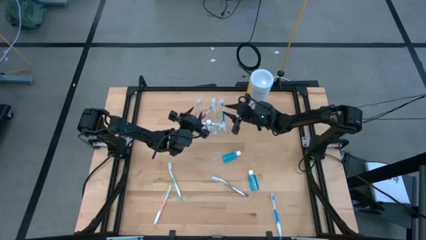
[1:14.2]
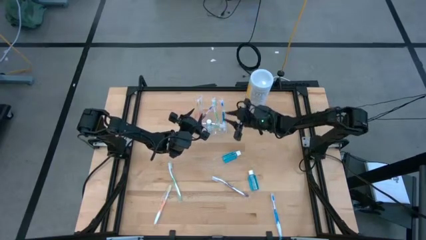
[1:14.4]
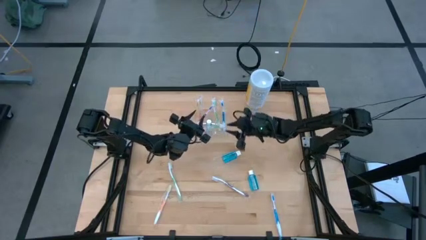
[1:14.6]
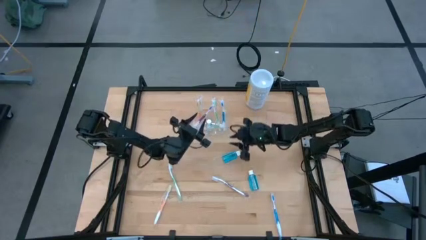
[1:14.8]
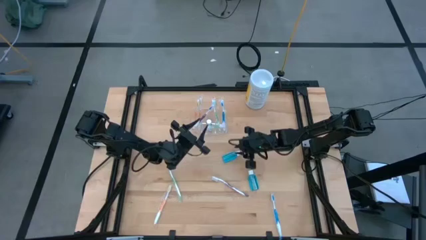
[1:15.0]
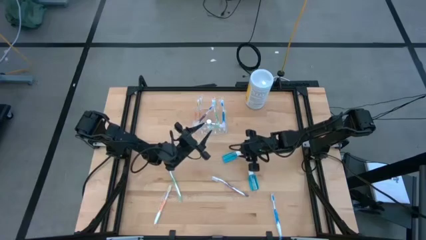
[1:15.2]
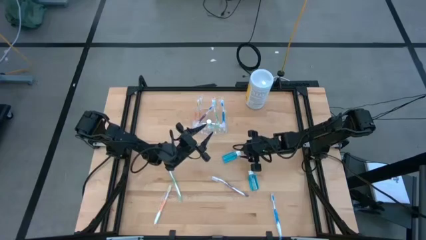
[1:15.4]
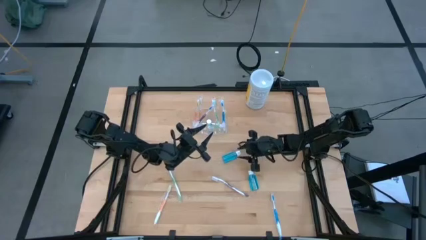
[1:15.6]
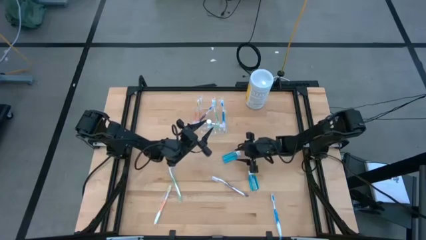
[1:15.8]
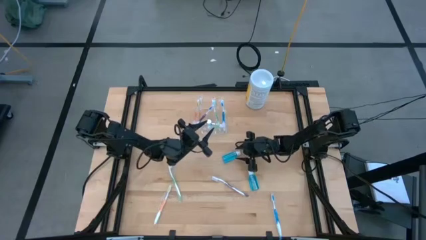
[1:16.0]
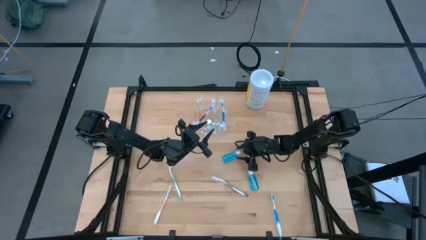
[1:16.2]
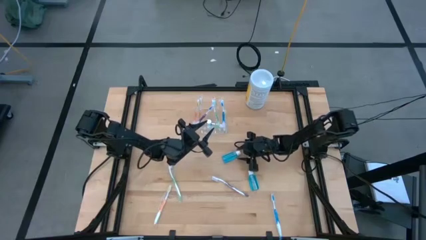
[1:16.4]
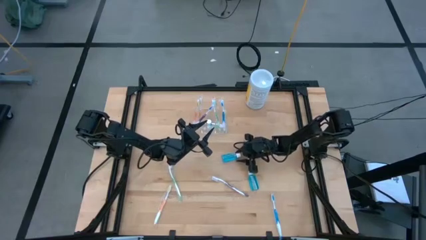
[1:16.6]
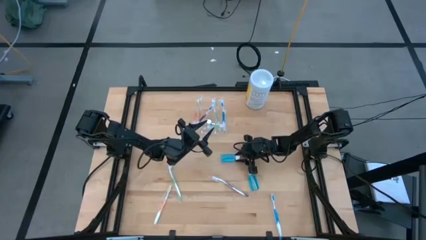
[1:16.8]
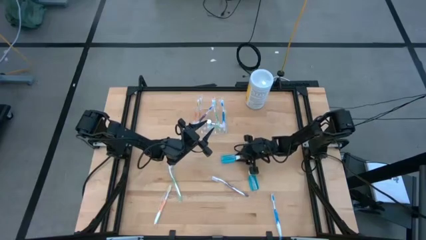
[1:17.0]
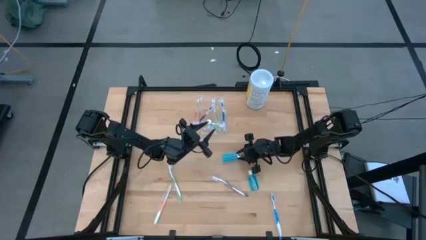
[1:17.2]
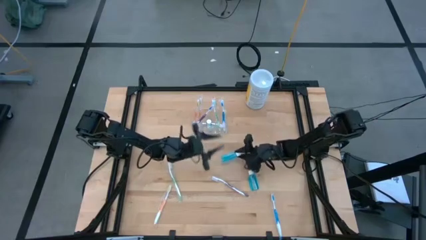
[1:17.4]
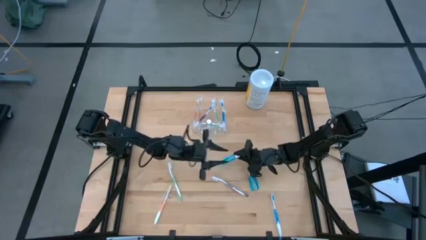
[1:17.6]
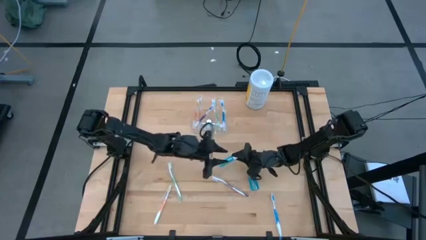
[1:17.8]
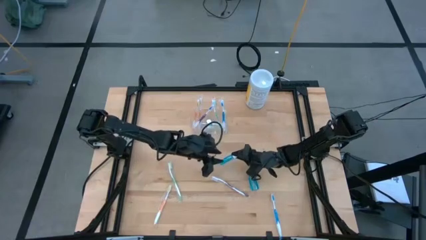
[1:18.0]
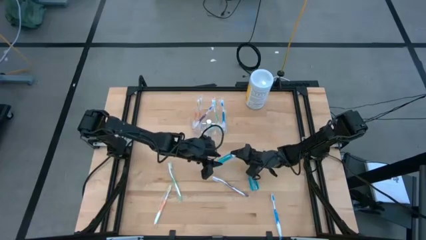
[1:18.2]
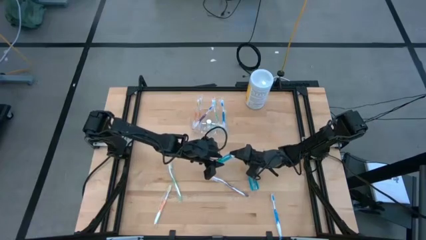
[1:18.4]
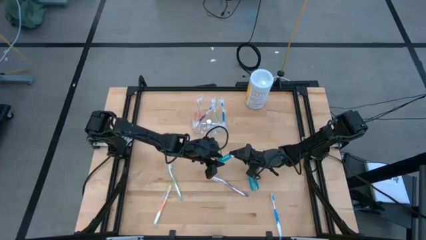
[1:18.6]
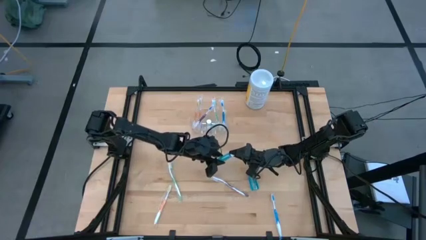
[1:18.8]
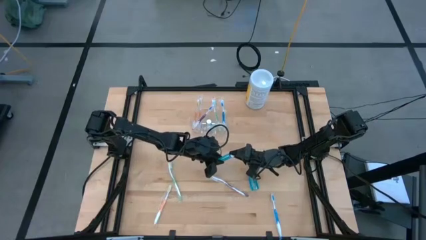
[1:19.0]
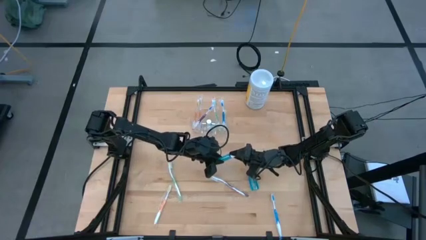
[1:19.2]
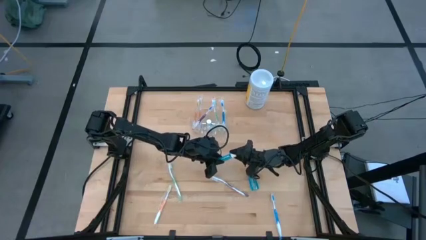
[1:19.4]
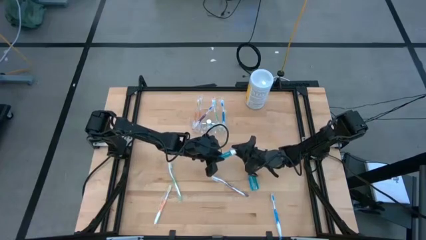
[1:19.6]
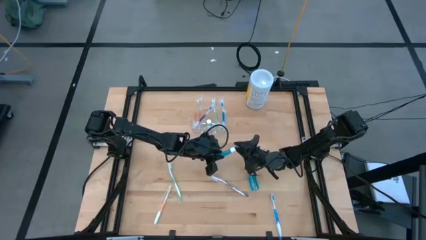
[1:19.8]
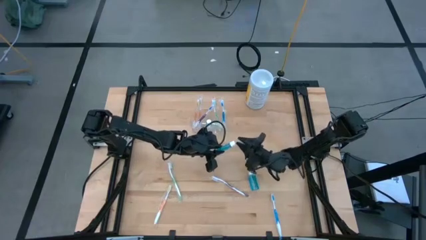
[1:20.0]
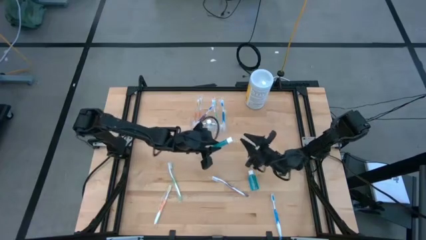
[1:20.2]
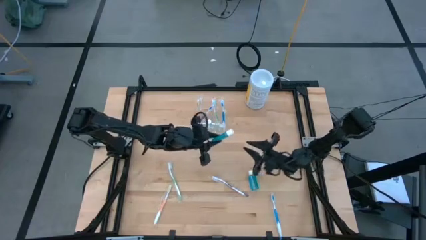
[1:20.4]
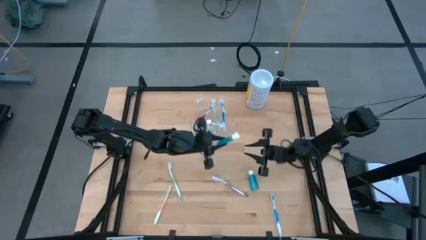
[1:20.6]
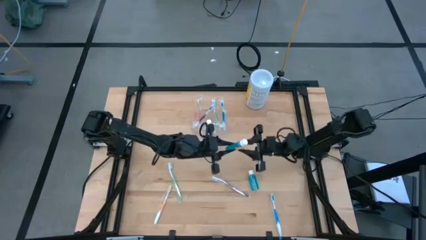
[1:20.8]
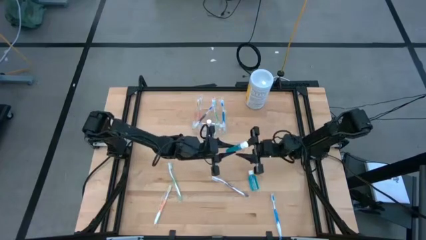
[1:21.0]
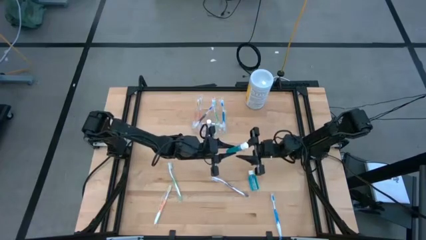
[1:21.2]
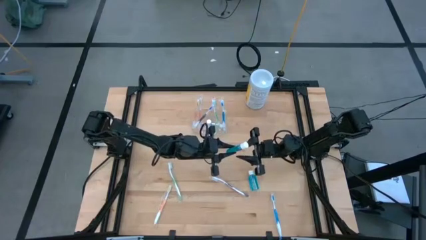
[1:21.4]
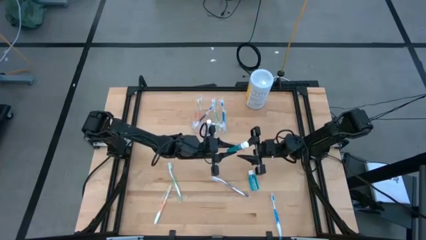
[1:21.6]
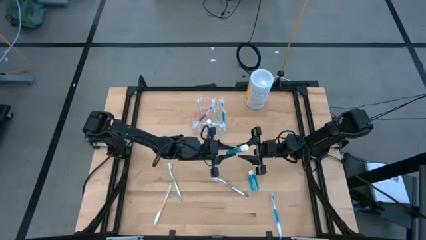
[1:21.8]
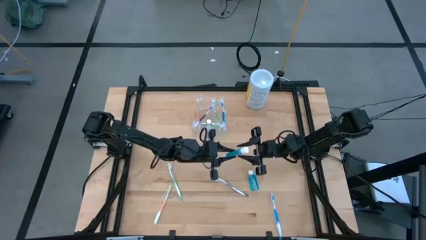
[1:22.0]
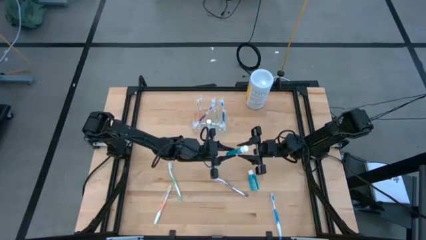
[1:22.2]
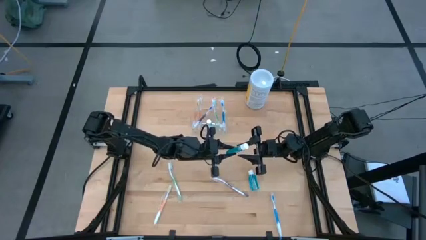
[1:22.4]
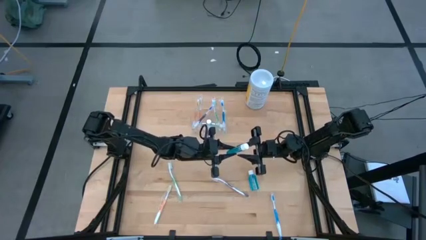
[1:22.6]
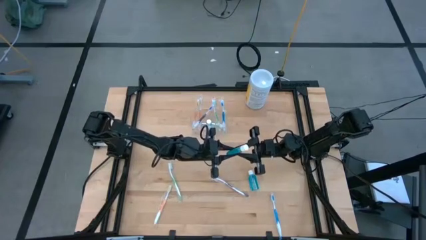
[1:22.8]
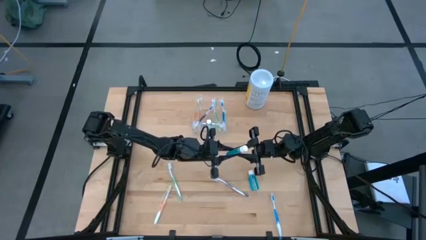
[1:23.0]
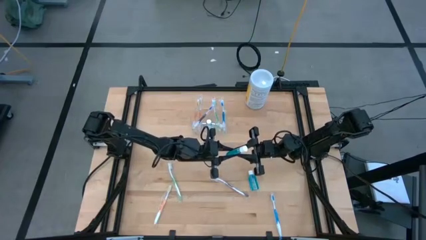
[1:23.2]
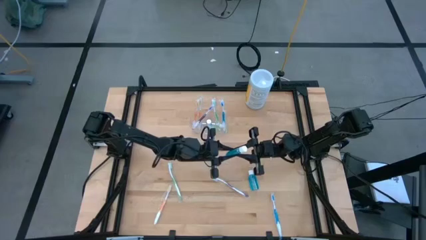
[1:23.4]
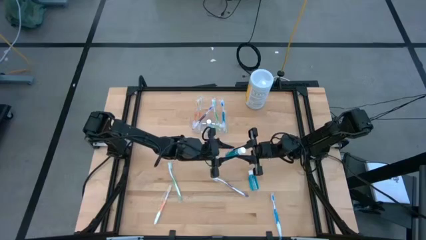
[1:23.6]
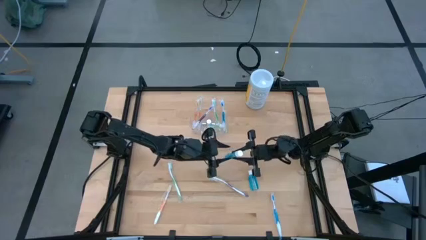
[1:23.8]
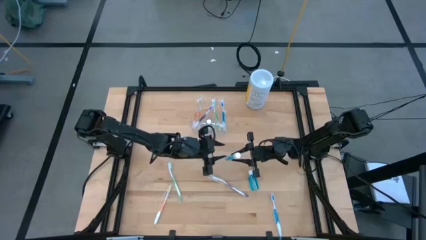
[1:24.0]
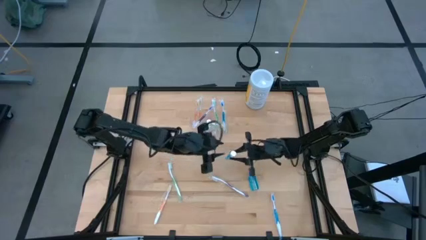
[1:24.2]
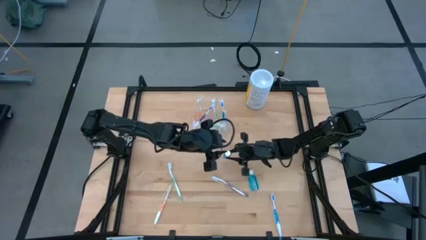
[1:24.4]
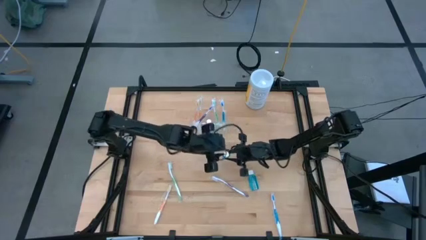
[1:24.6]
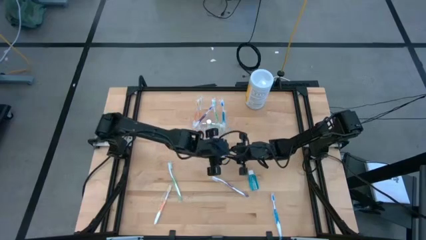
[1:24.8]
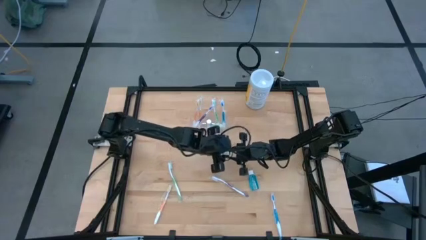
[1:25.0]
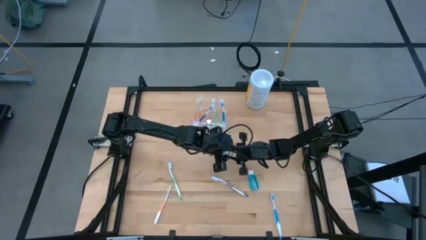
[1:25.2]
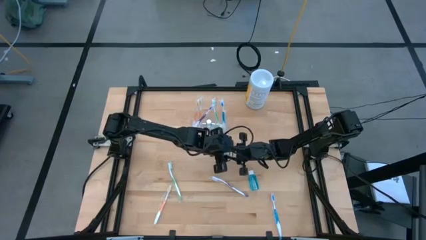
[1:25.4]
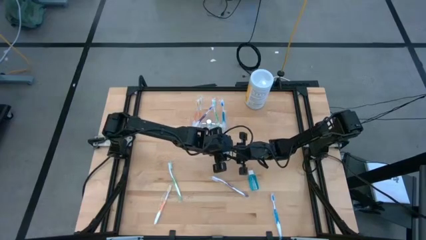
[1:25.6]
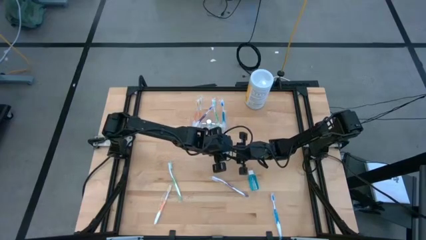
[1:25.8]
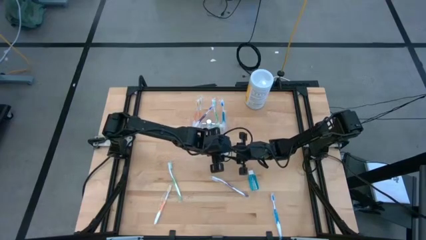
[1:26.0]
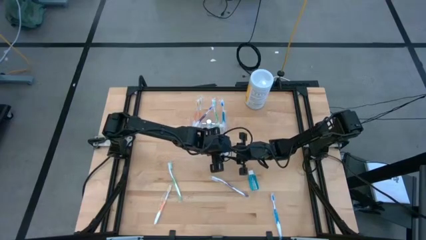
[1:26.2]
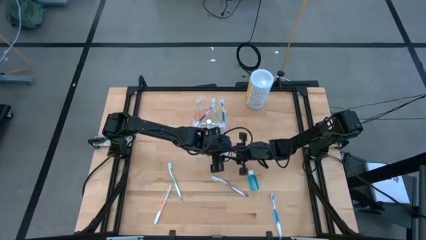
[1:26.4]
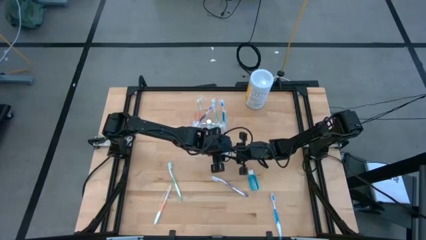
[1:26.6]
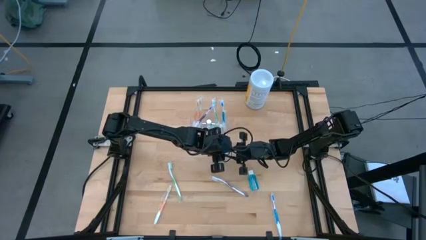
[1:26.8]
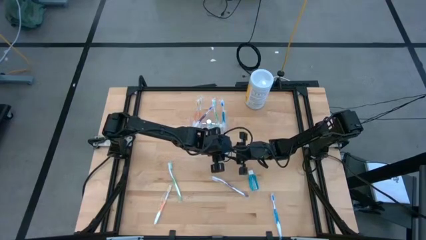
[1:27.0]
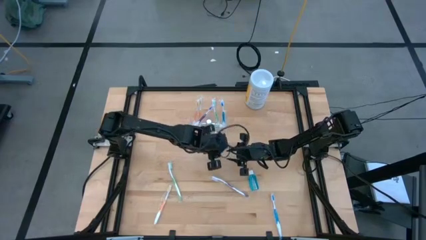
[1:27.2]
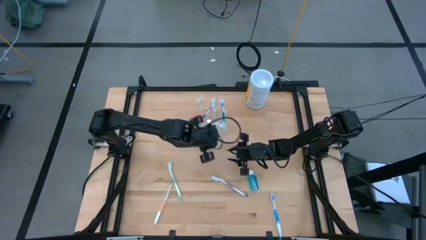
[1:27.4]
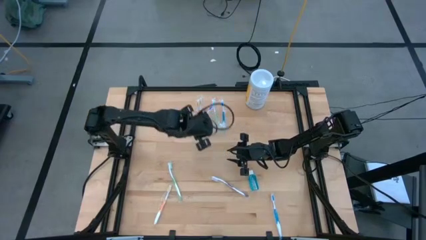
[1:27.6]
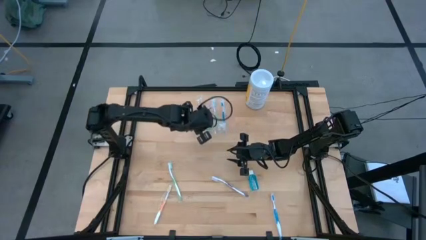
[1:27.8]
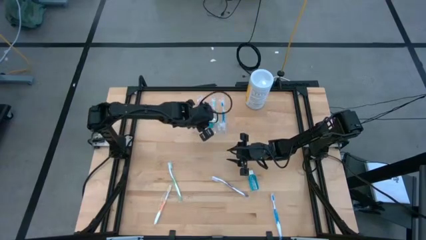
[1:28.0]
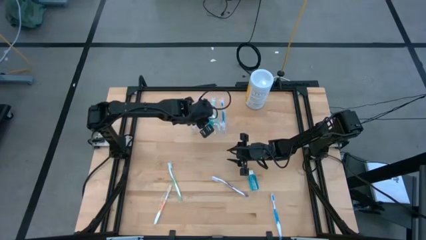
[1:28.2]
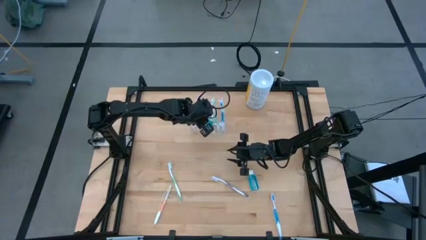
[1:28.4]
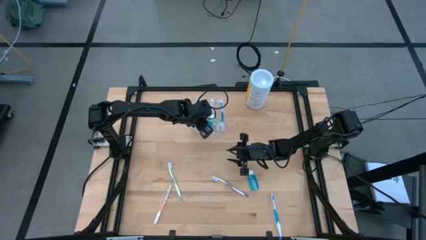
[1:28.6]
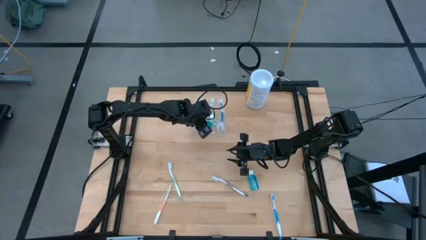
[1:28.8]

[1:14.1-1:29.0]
Task: Pick & Place toothbrushing station
Put the top mouthwash into the transparent organizer
